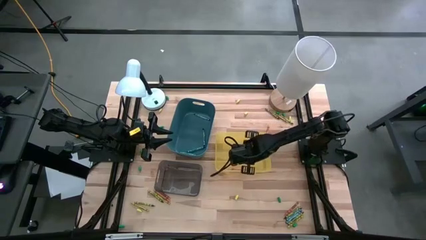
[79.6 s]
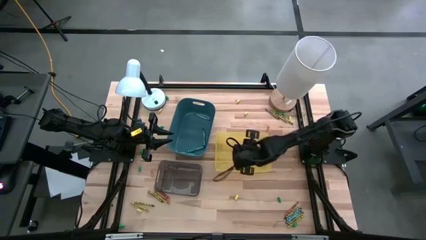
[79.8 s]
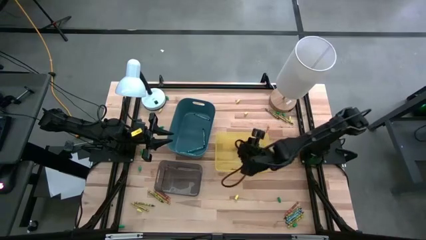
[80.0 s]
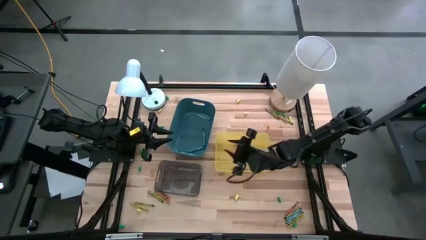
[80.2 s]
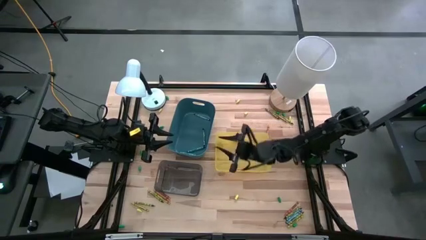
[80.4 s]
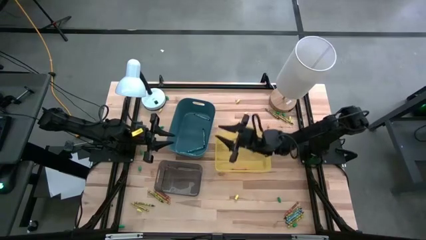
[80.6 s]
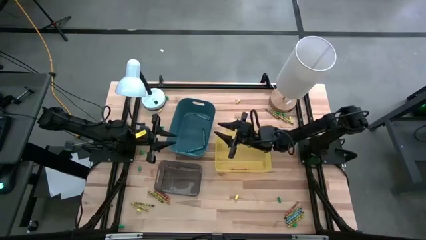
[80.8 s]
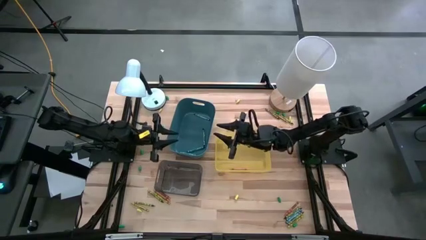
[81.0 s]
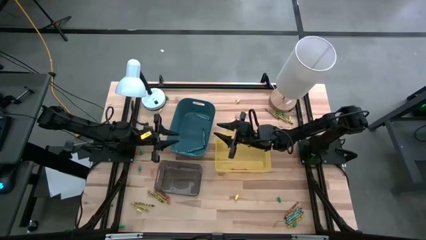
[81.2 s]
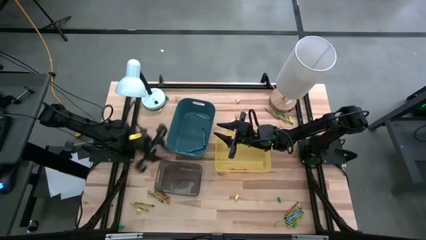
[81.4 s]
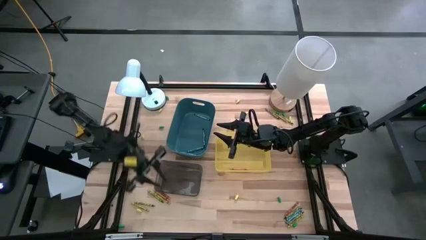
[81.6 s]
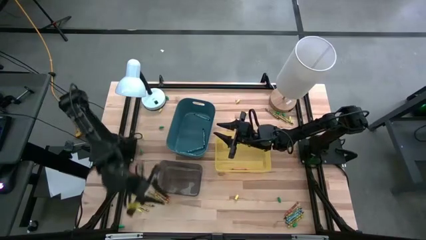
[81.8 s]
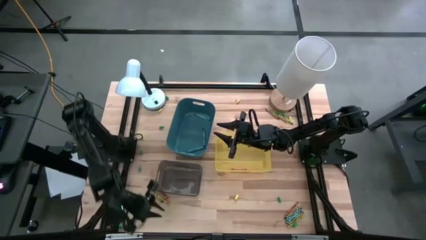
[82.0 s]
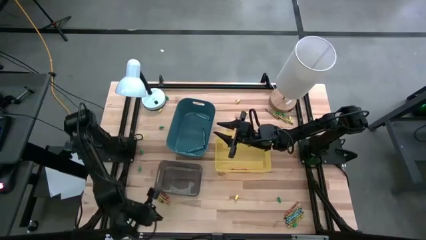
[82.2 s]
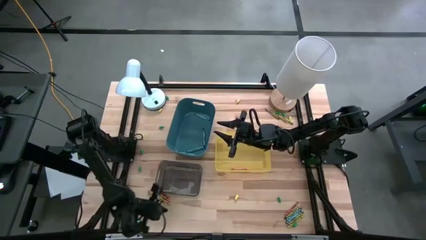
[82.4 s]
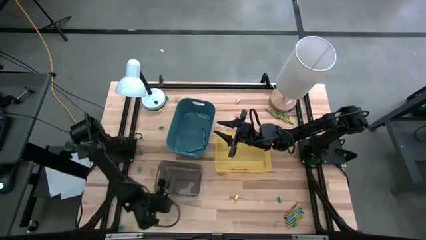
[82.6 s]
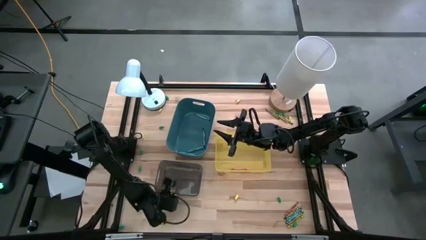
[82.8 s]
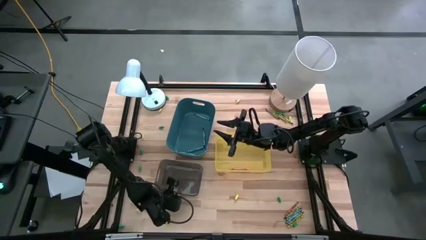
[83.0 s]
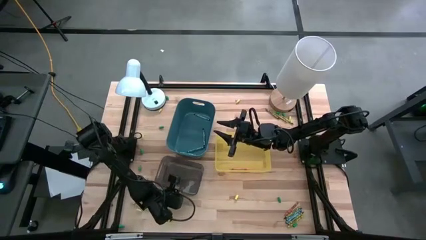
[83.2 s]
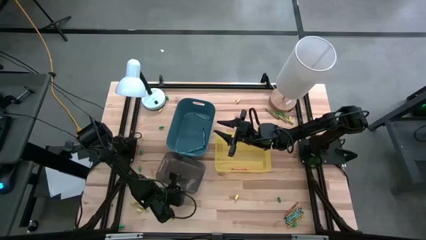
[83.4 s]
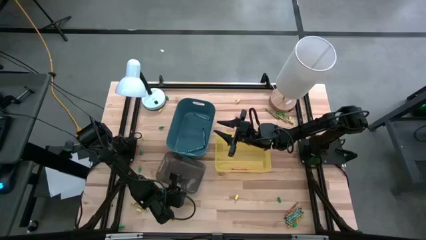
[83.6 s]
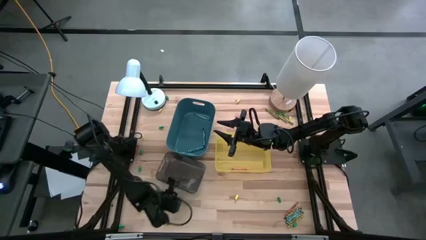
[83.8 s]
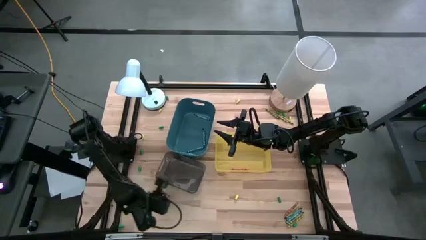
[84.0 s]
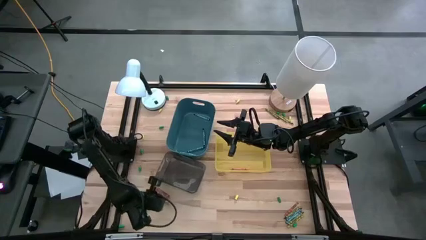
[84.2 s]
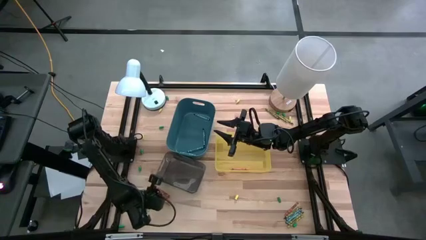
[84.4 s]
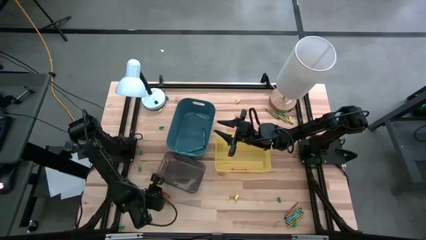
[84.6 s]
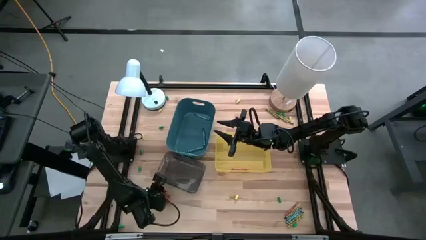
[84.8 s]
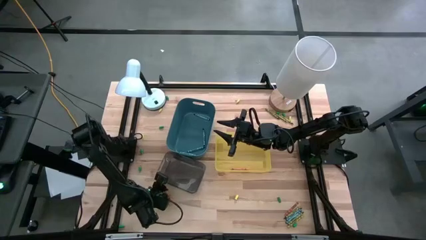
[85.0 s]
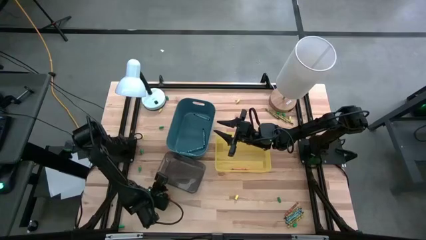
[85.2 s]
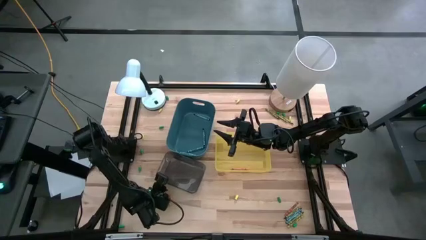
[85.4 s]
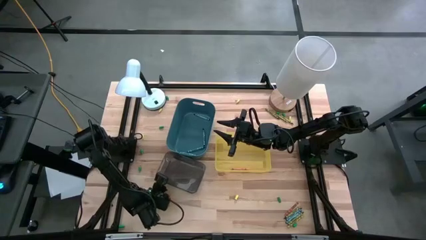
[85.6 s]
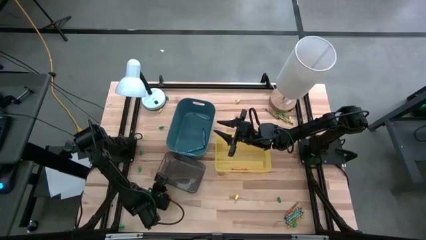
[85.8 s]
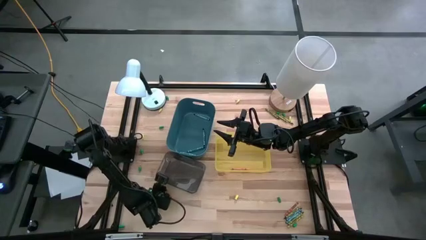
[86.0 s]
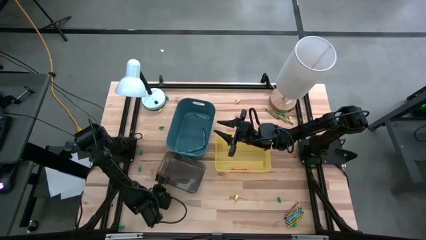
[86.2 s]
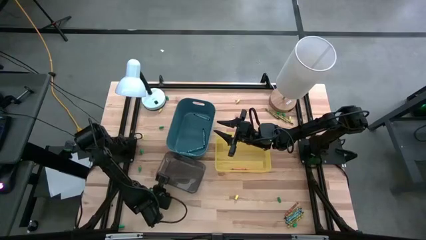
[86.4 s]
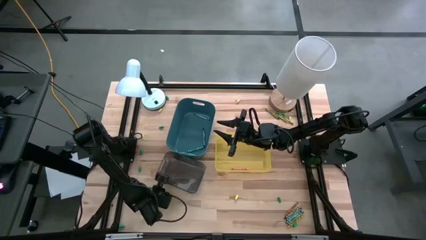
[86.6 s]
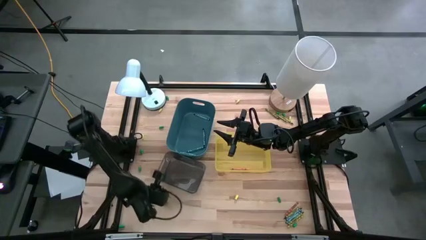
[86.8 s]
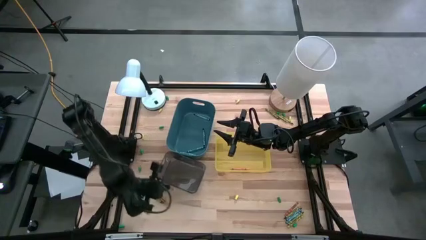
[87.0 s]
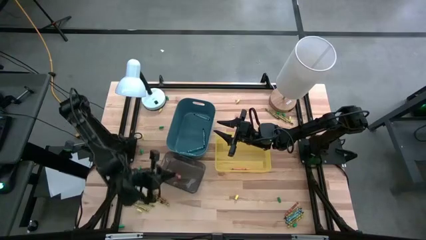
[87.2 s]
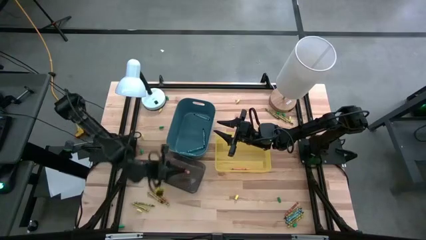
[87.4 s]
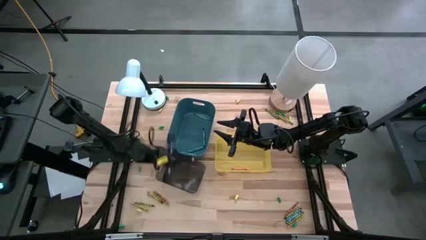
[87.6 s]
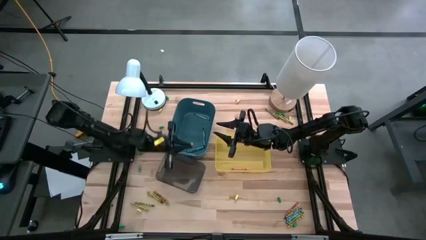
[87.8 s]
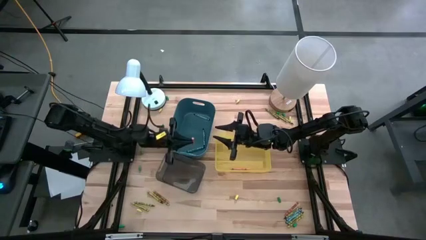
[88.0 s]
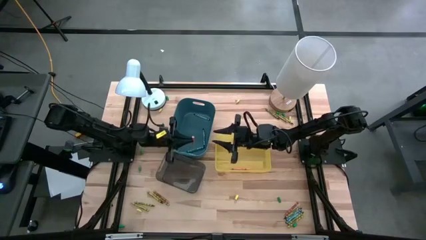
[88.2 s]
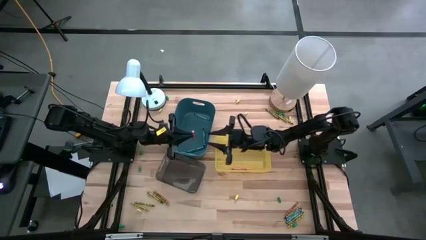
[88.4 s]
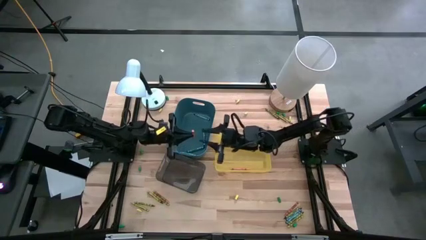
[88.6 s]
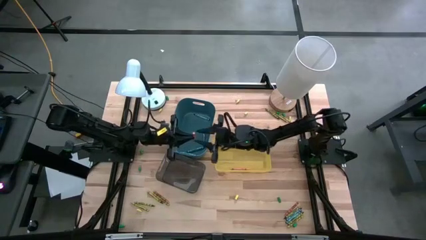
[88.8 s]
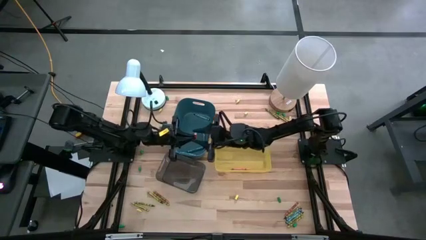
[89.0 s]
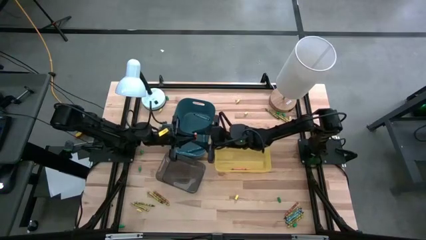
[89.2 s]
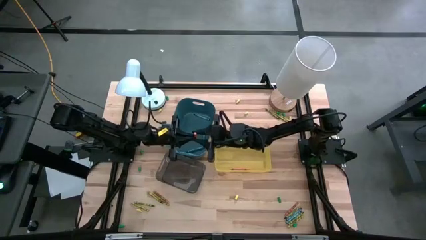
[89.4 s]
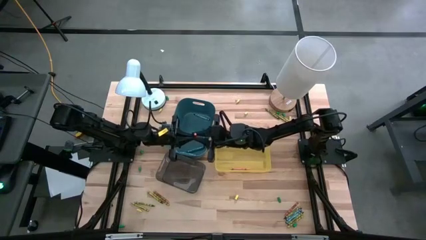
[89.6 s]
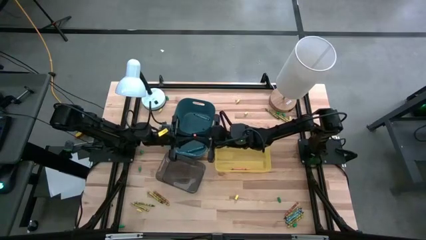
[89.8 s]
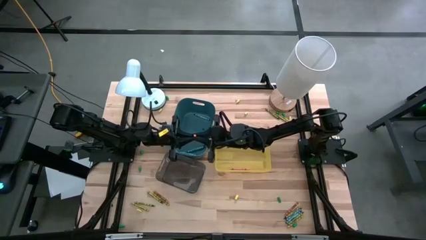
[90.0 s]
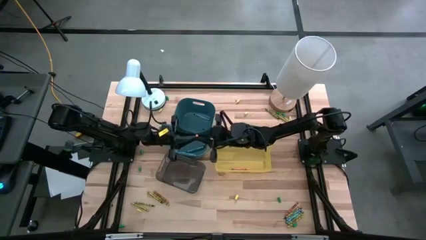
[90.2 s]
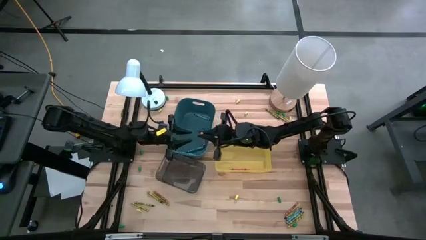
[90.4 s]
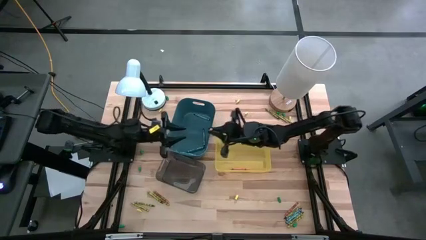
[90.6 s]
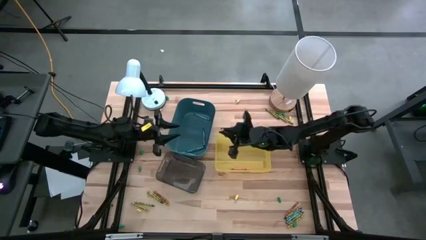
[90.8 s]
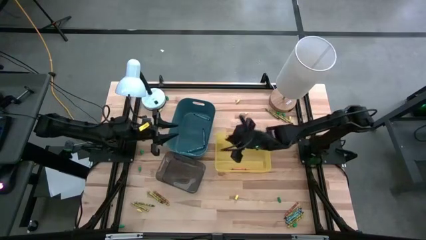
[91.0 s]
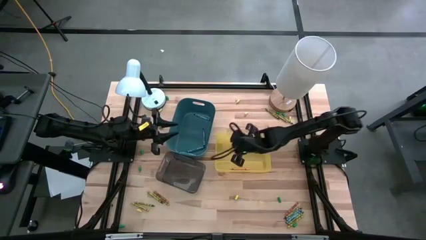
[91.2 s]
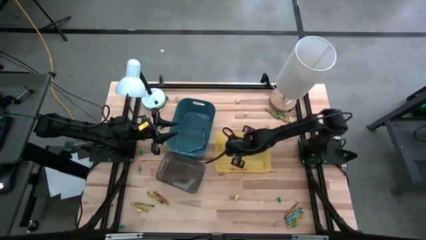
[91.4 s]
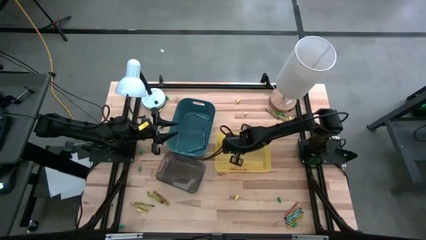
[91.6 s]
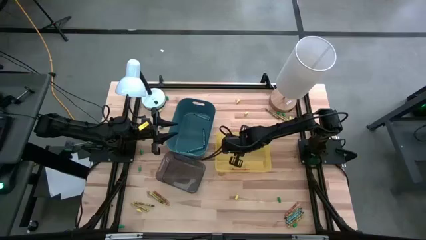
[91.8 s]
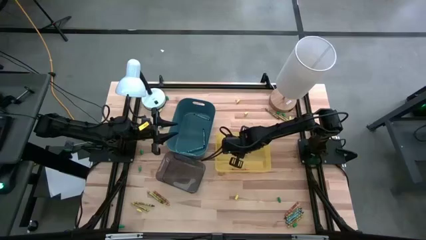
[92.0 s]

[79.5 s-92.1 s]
Task: Sort crayons
Put the orange crayon into the yellow bin

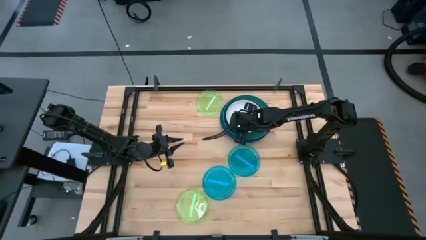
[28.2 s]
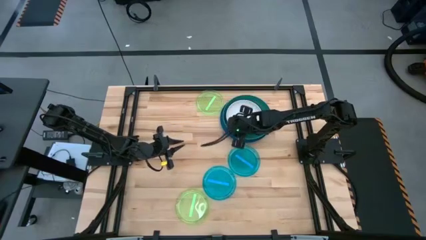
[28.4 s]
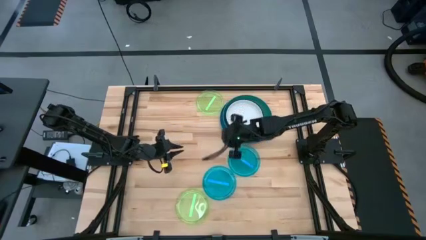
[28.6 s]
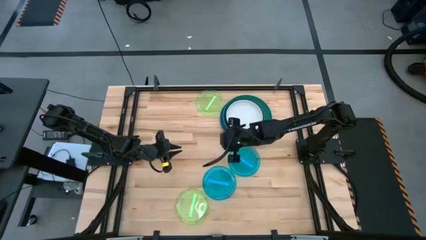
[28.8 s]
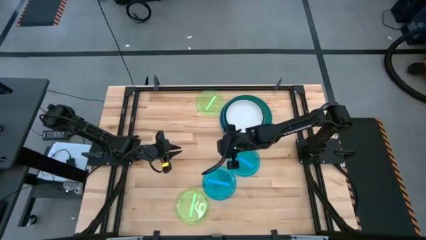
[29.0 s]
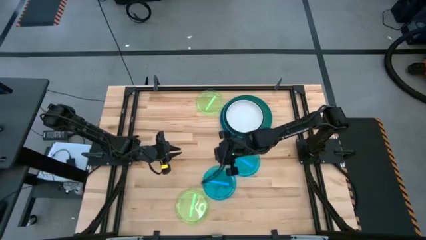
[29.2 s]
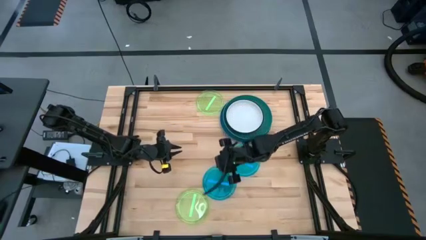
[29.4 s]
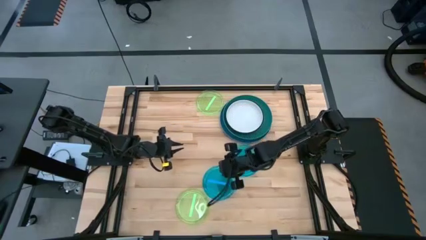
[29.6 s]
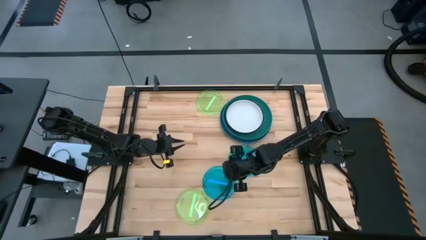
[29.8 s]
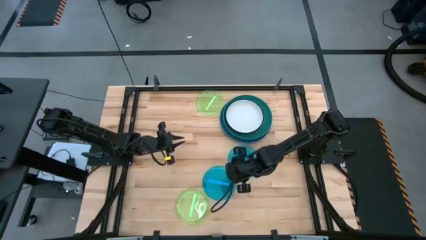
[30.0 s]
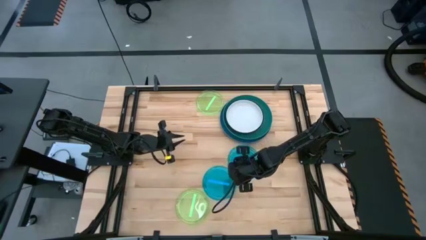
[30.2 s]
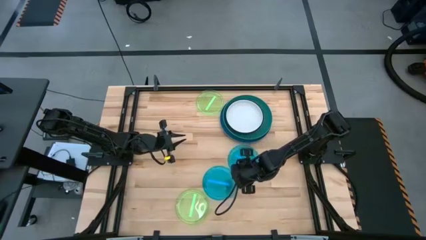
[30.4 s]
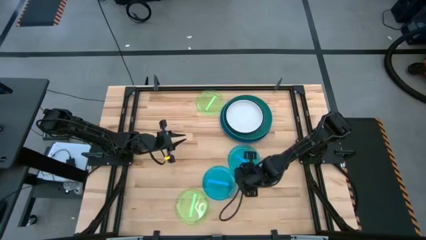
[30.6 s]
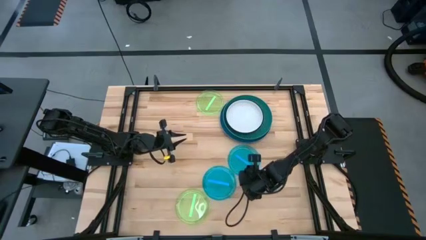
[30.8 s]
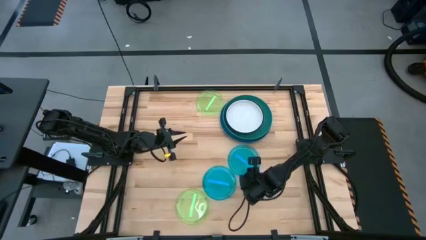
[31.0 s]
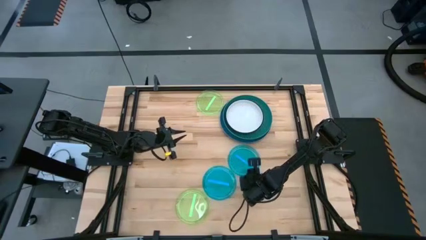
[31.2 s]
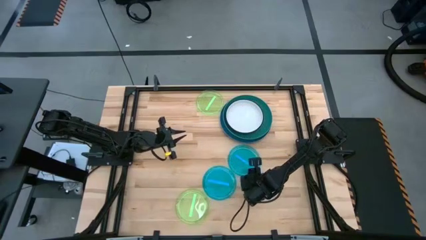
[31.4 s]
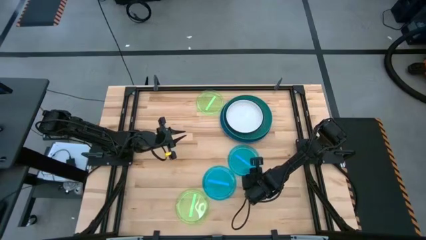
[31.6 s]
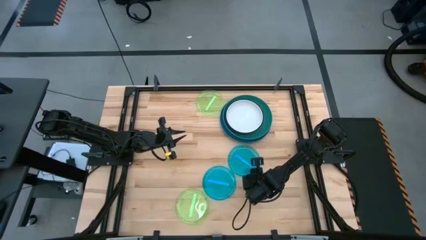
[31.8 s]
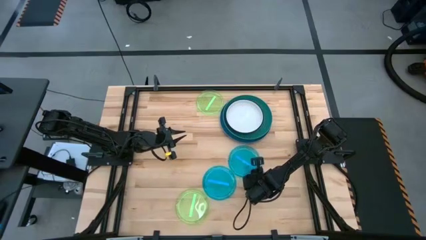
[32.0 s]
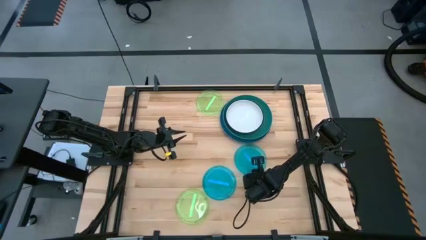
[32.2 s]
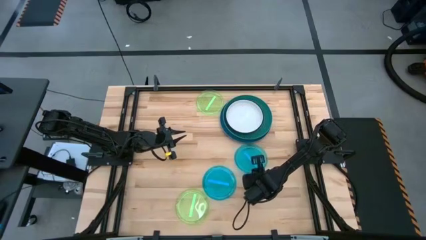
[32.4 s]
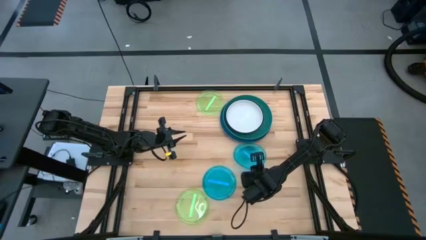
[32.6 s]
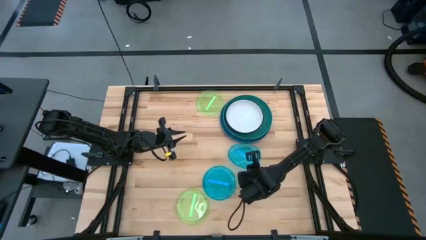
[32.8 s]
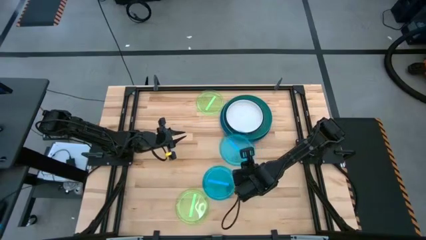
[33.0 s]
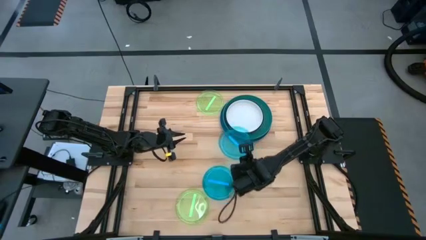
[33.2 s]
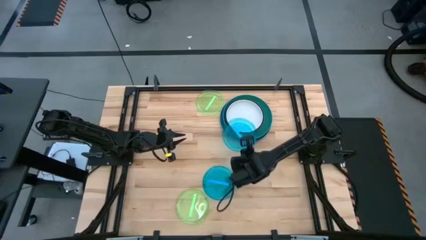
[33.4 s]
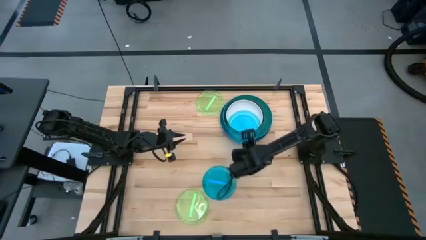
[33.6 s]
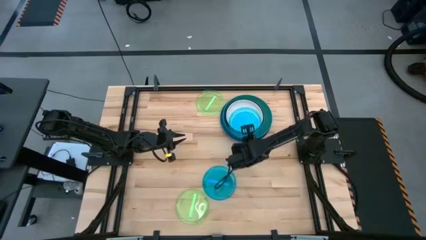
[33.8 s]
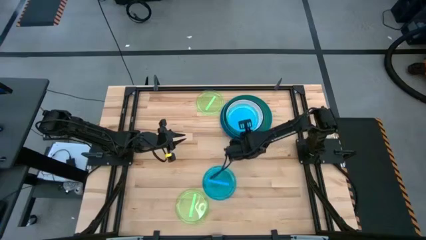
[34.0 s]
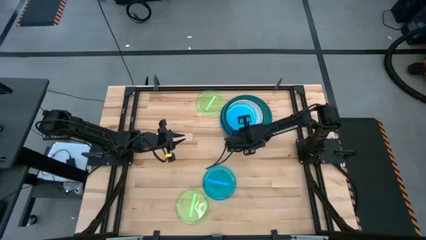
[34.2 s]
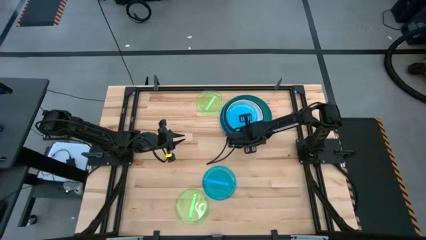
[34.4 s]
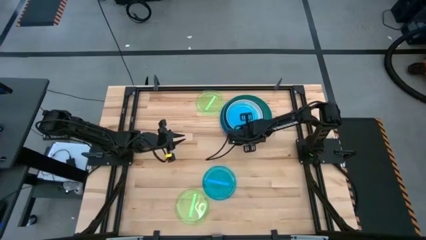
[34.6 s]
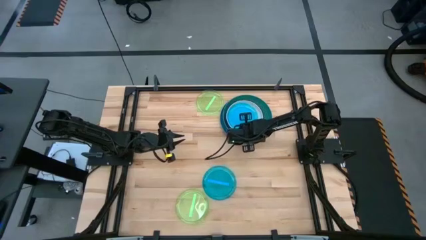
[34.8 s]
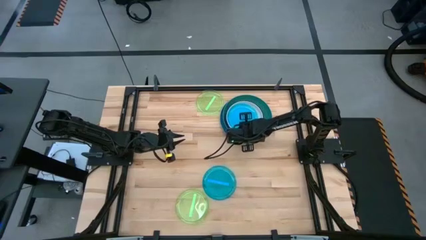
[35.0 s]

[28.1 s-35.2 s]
Task: Stack plastic plates
Stack the right light blue plate on top of the white plate
